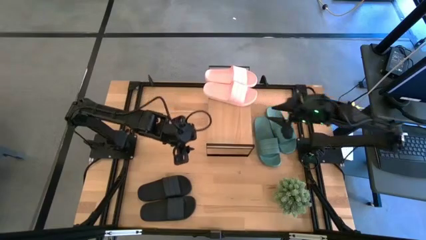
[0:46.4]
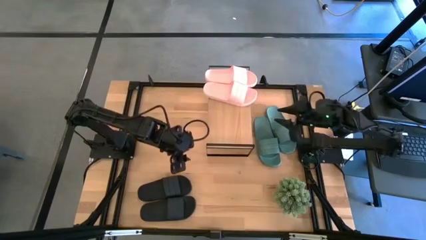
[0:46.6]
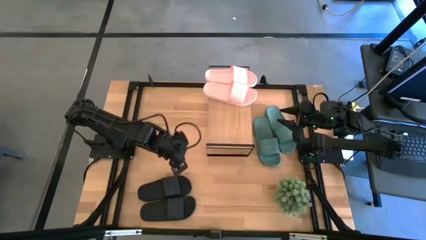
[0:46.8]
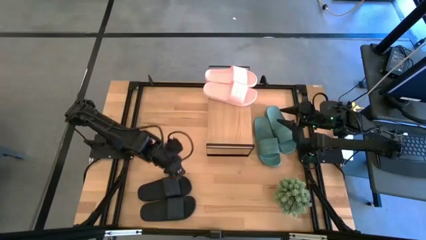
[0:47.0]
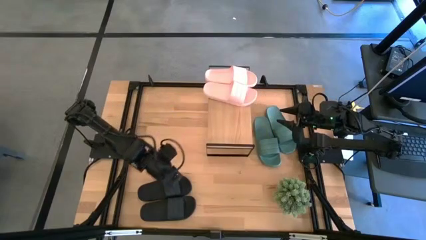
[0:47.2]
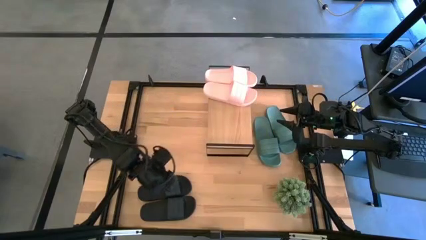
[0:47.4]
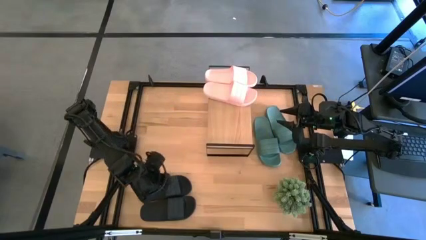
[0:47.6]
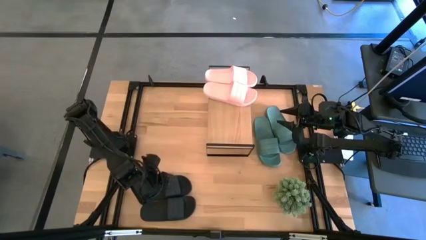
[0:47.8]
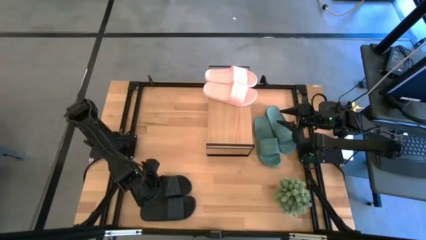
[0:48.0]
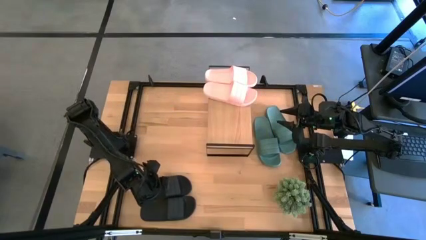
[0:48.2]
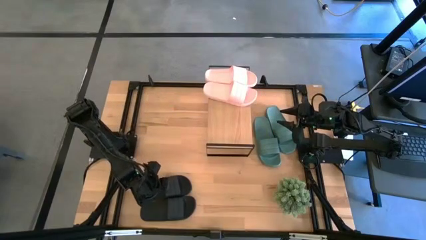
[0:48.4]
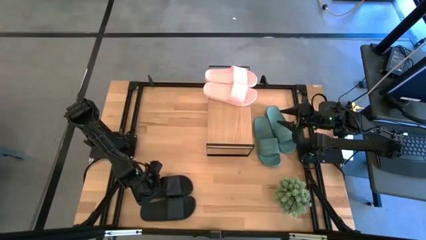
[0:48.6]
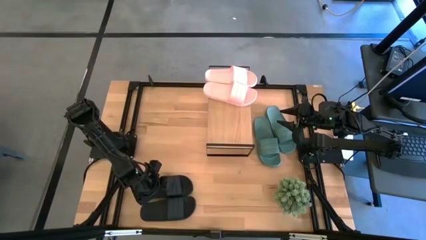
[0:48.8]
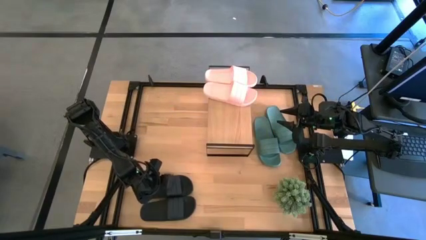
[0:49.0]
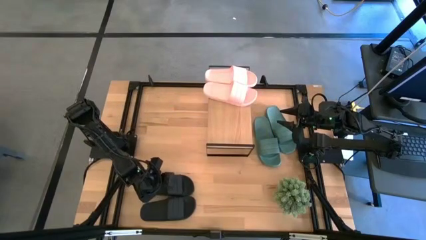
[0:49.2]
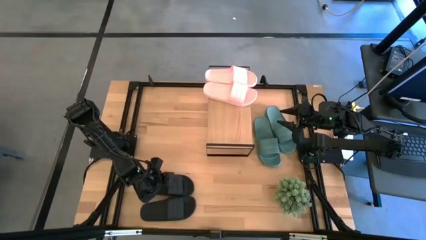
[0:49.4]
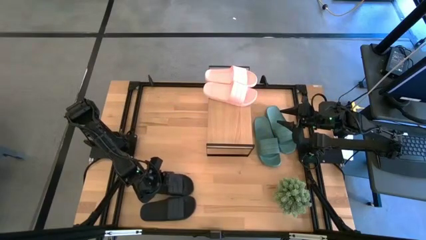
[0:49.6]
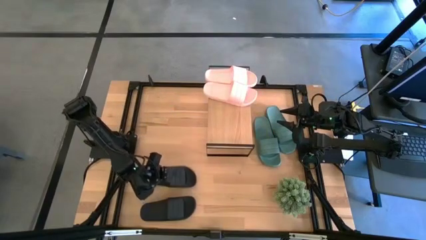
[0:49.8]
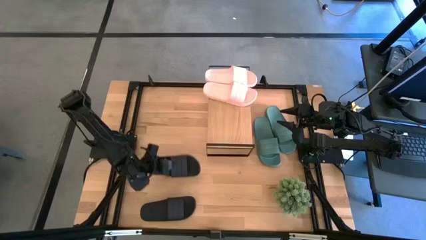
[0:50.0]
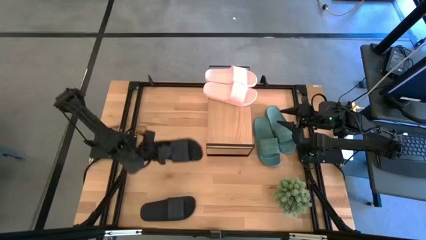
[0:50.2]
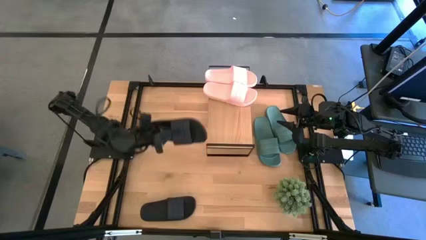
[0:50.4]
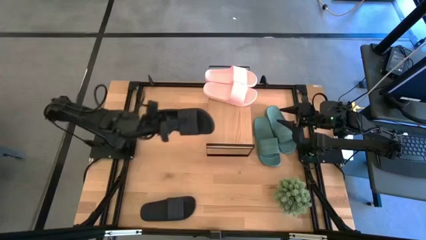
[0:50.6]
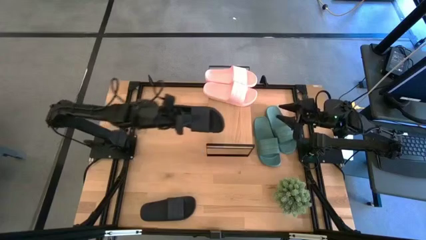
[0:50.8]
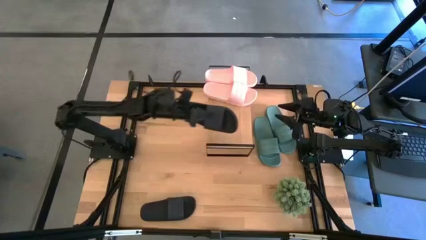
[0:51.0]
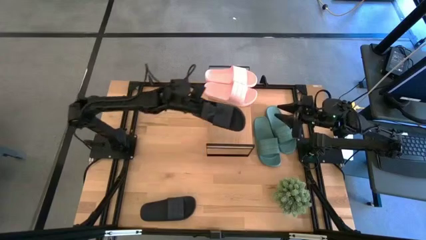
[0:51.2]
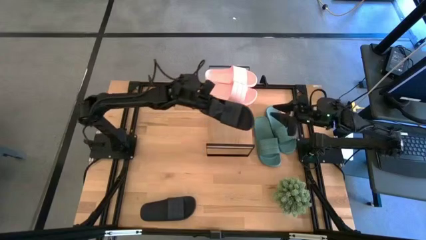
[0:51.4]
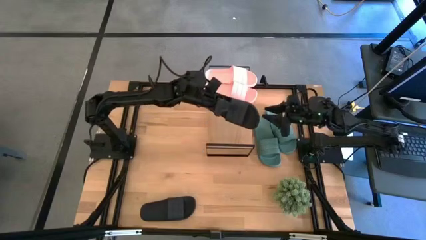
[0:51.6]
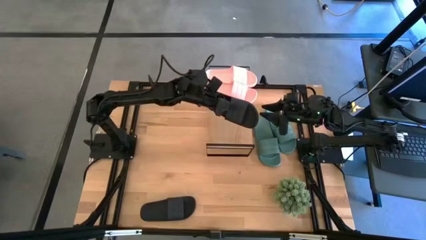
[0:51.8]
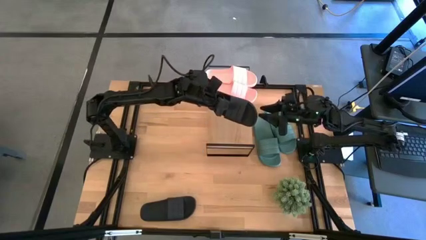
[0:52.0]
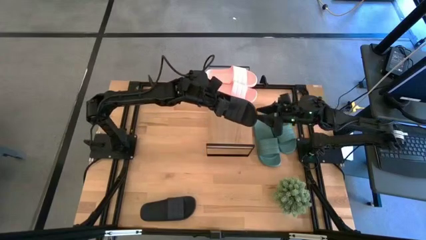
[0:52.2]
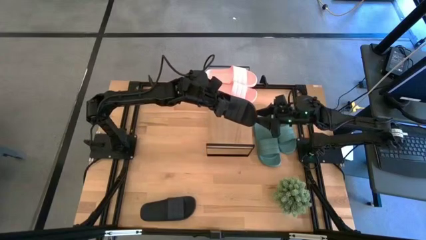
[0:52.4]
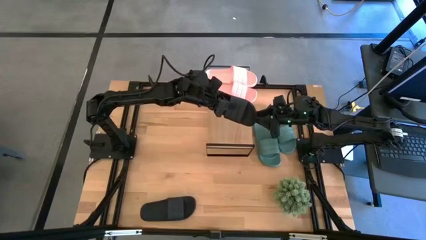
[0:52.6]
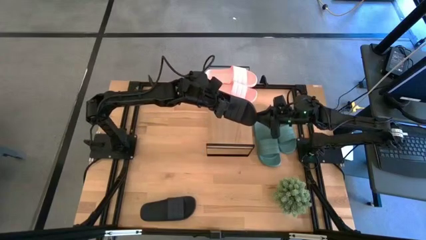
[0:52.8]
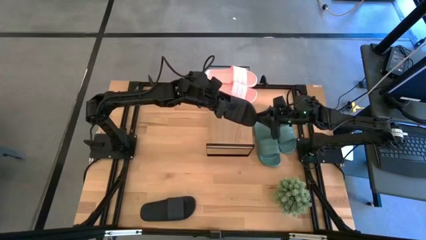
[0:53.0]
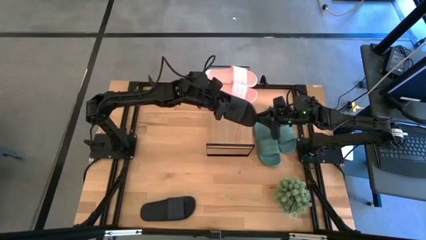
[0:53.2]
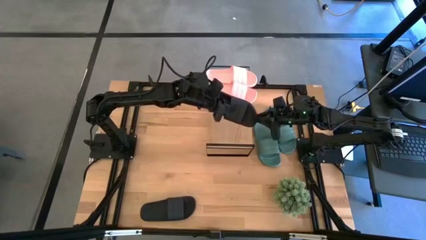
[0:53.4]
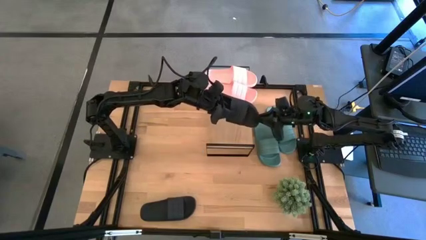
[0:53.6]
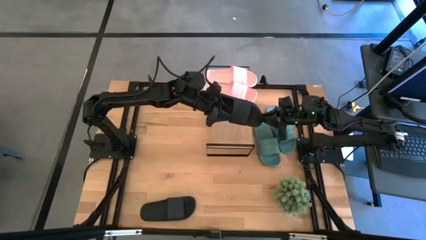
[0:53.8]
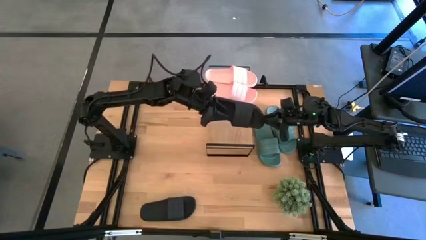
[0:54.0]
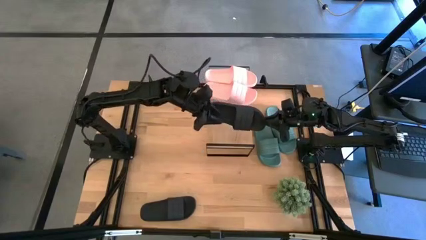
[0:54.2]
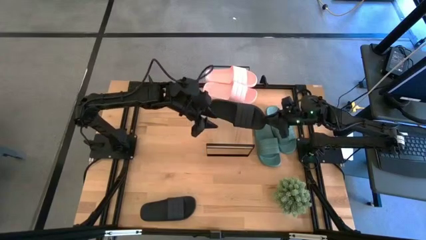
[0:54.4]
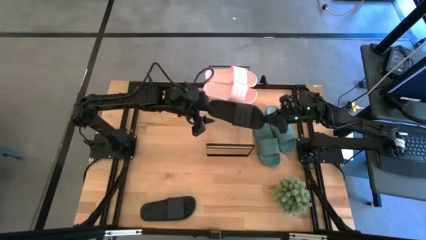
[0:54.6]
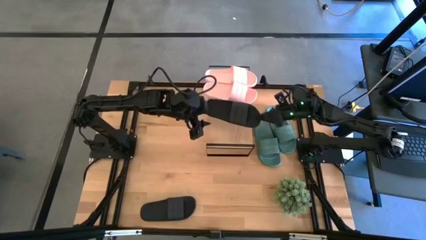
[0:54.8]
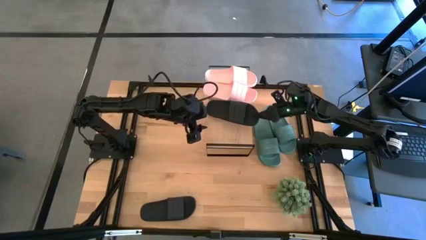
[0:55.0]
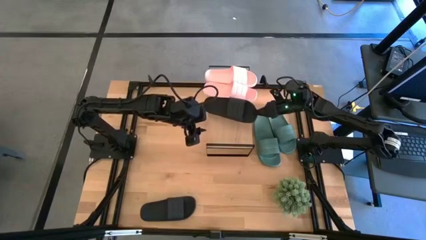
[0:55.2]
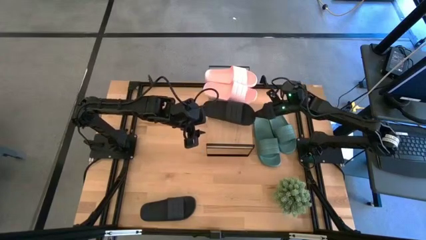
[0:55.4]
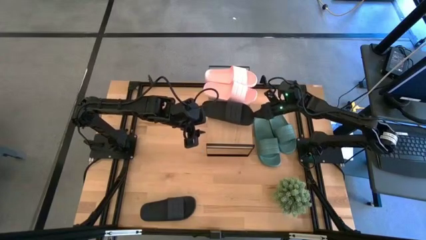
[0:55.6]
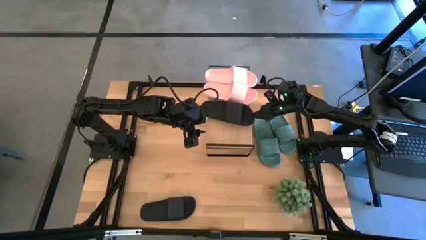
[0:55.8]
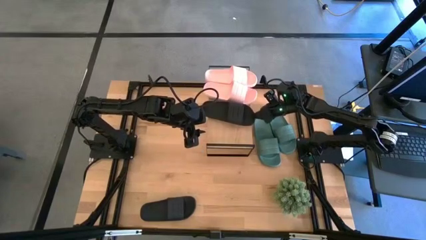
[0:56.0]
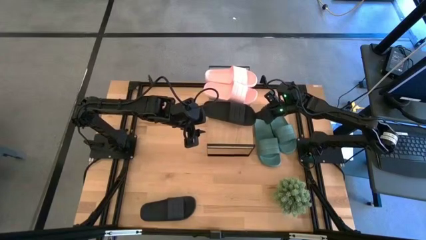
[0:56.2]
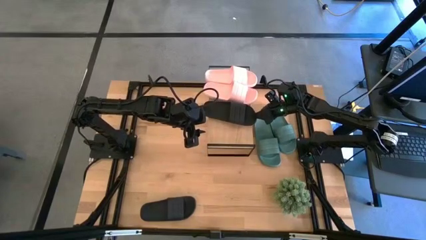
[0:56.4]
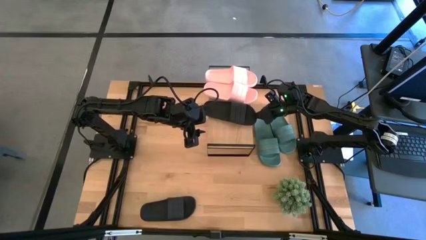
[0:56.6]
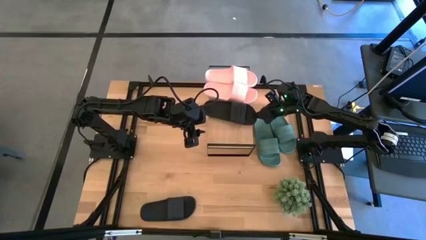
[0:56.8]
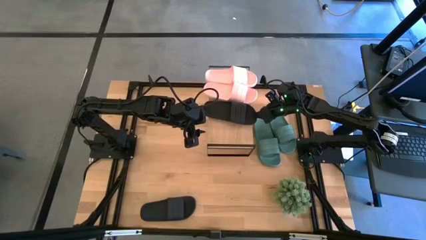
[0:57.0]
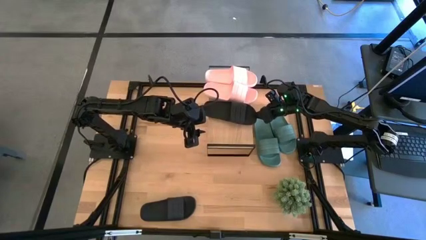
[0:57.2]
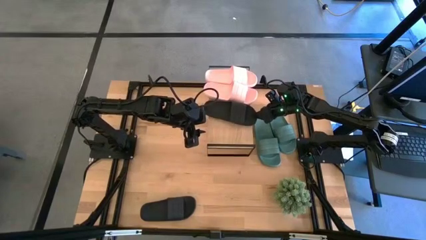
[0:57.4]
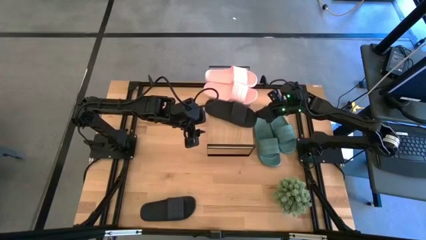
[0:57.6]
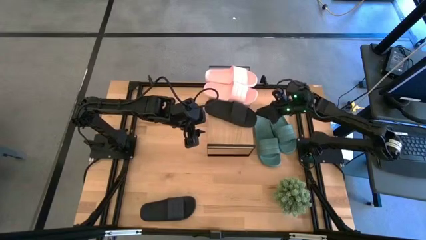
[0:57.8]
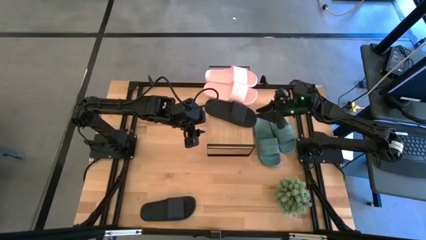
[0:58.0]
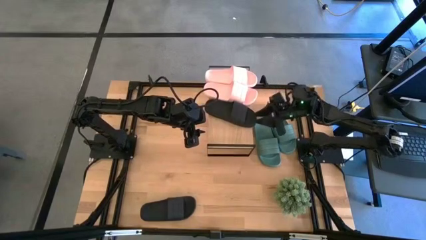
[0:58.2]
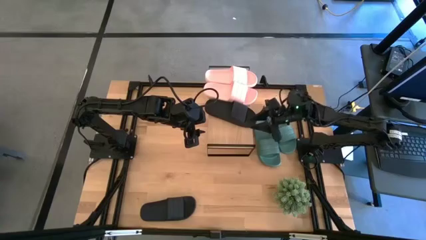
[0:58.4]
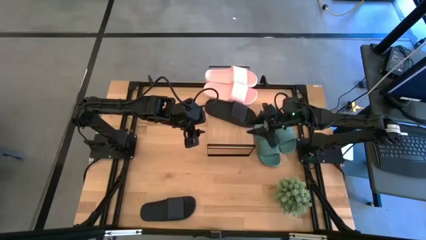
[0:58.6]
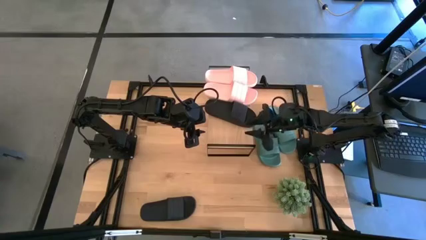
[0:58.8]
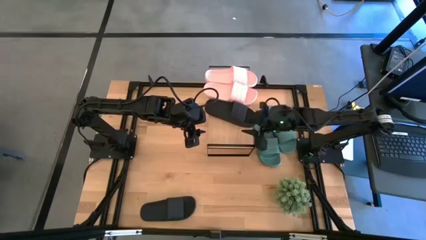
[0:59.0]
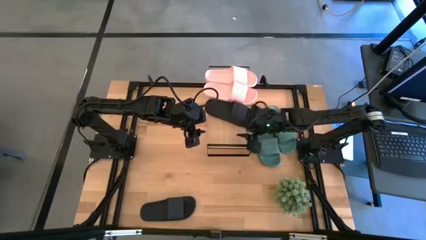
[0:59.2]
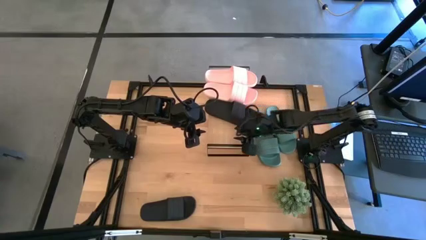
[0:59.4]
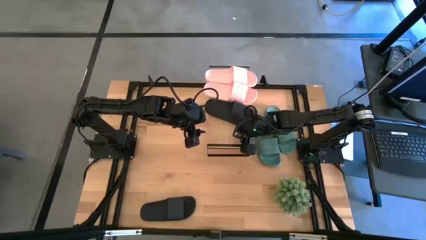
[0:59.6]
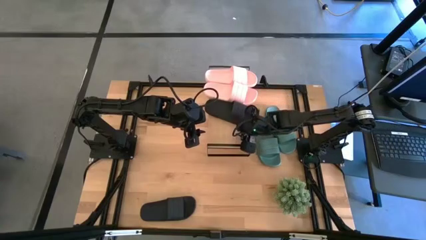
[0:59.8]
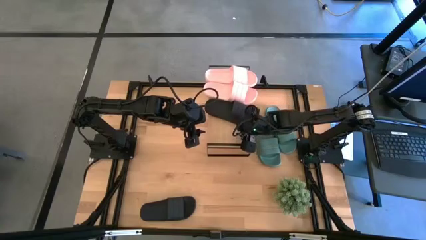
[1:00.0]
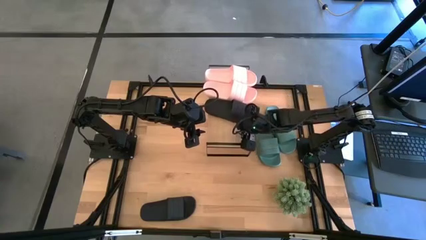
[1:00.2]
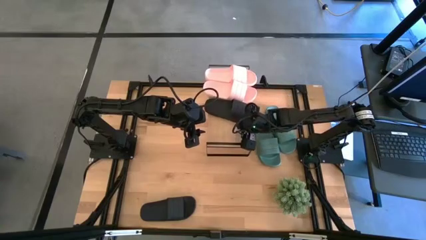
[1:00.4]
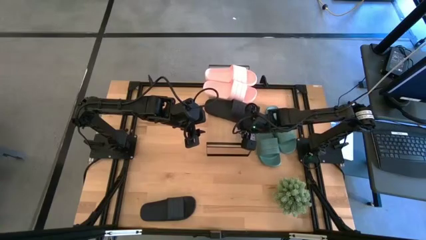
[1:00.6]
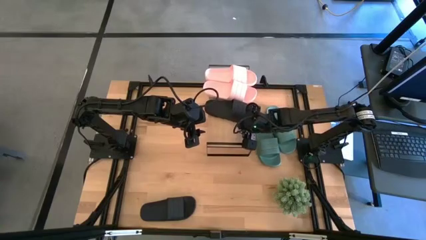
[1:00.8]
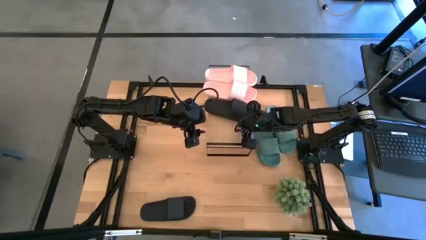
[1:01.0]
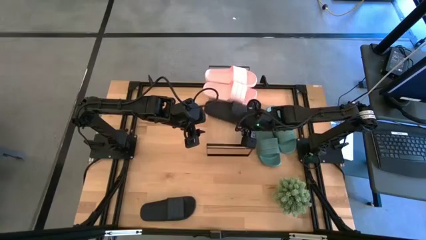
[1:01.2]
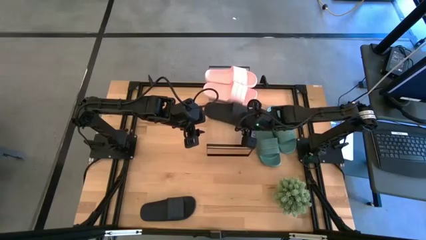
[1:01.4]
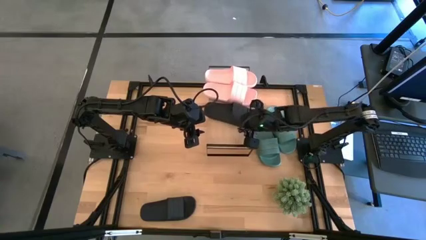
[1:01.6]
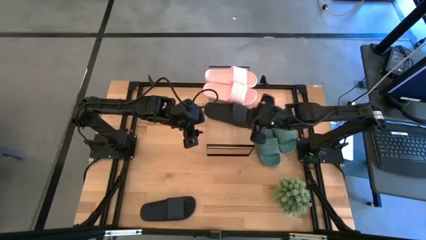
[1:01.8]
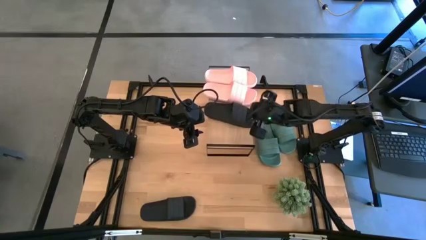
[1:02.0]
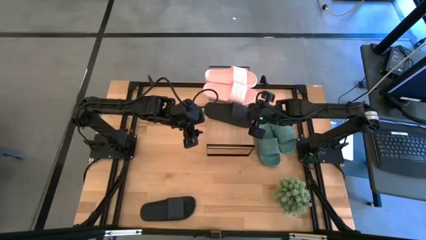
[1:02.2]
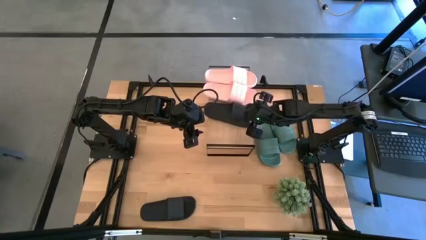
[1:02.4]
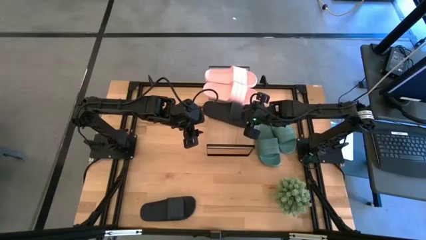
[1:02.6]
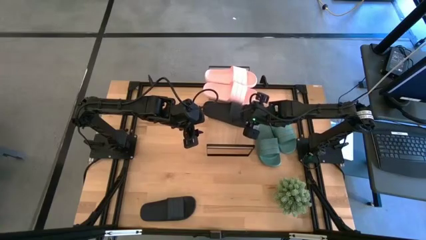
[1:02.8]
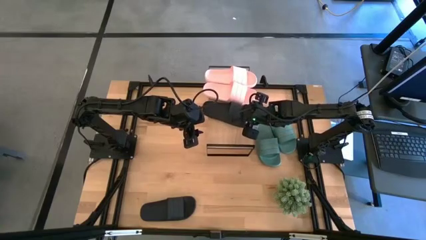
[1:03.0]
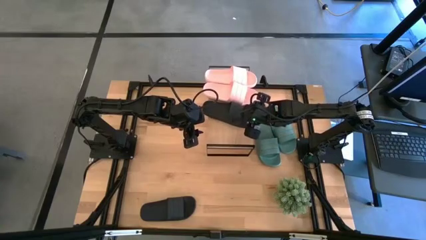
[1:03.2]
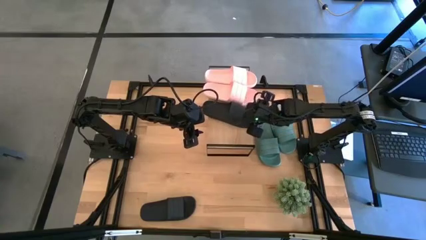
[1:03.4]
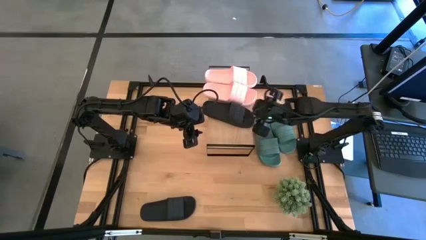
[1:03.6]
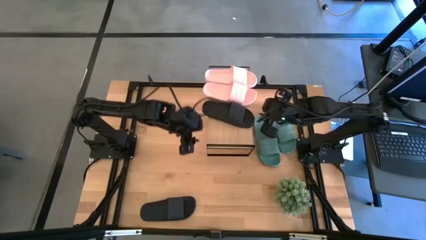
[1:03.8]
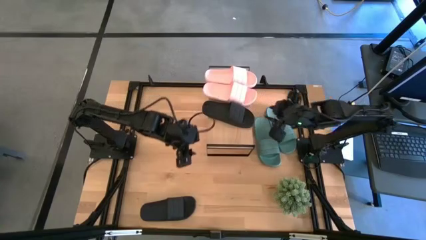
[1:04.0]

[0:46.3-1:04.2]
Task: Pick and place slides into the shelf
Put the top black slide on the shelf
